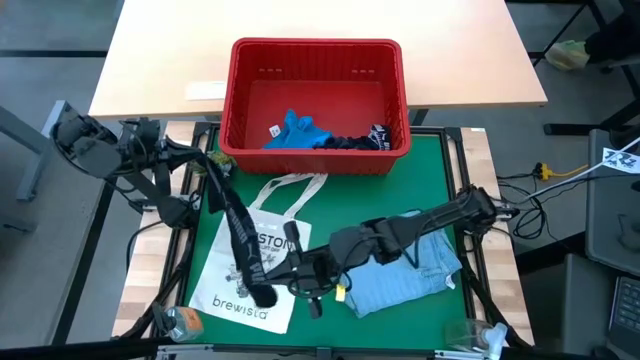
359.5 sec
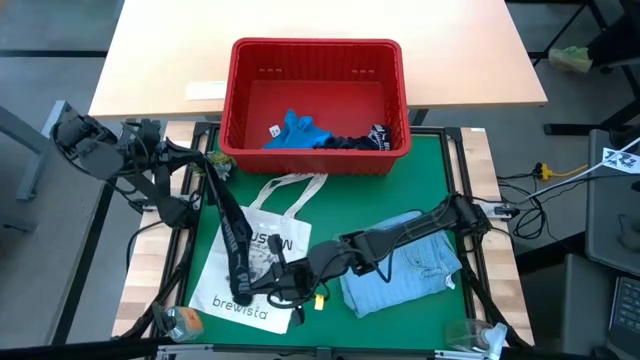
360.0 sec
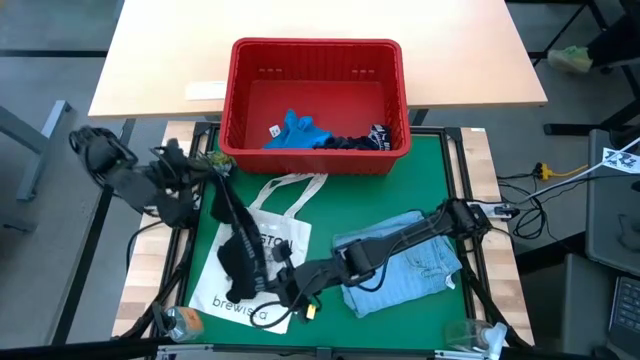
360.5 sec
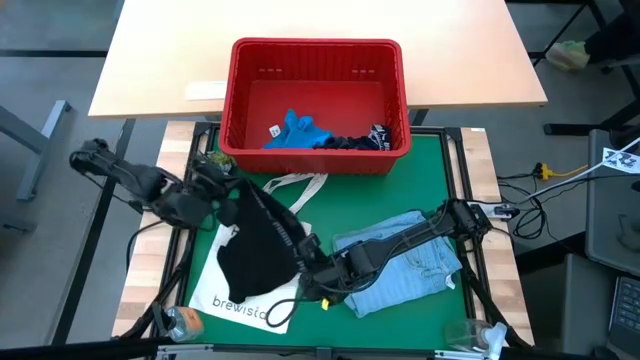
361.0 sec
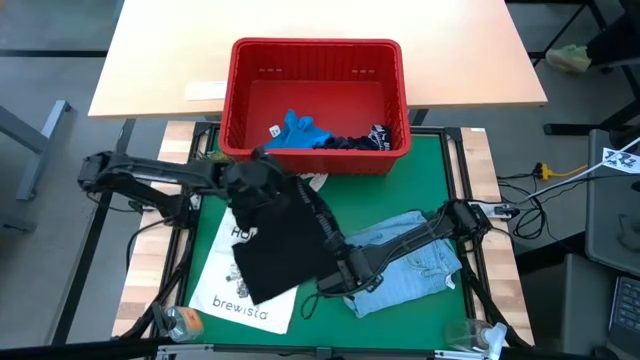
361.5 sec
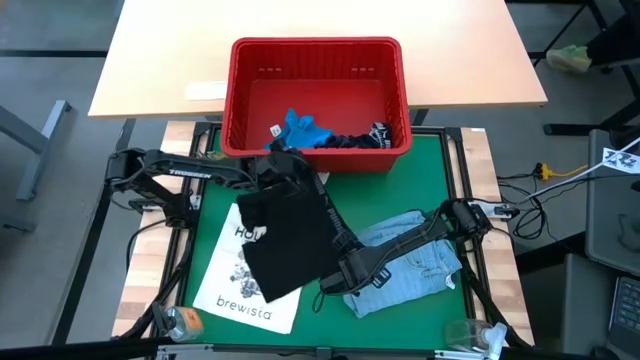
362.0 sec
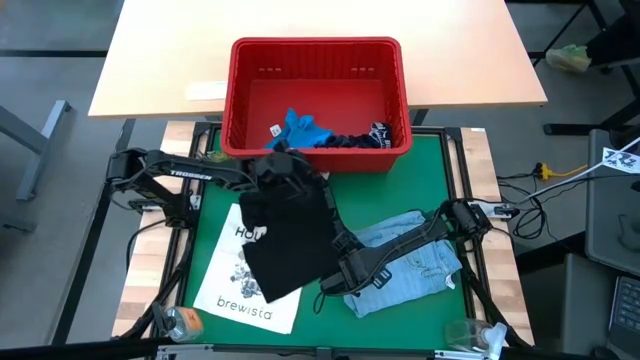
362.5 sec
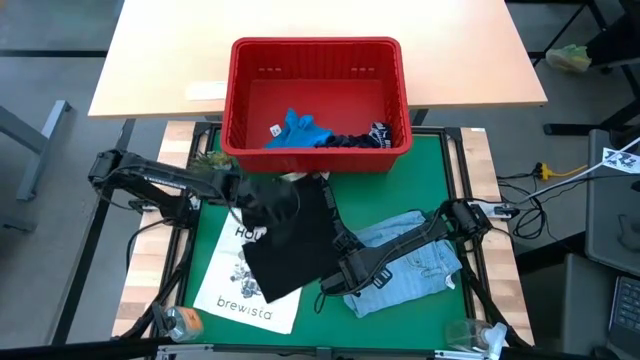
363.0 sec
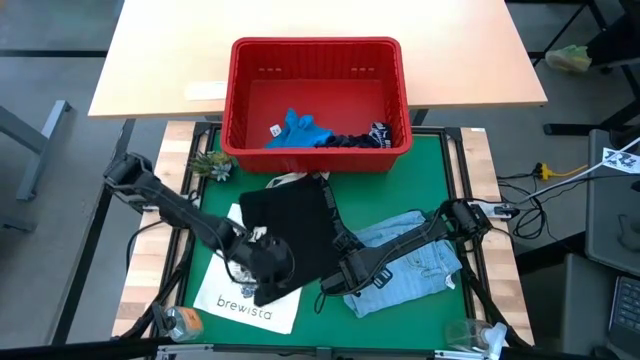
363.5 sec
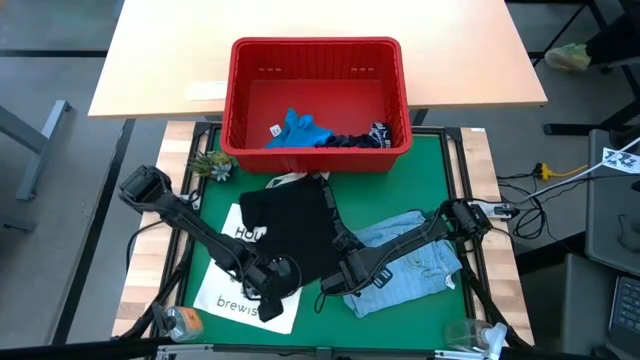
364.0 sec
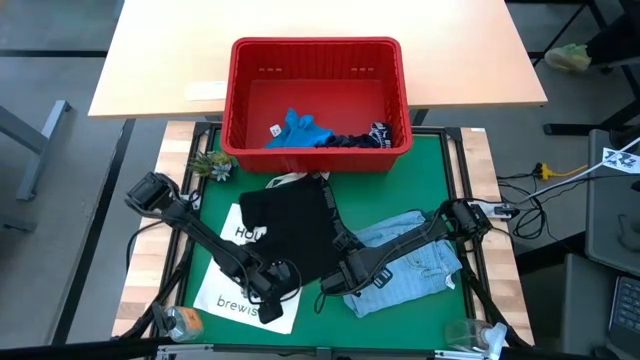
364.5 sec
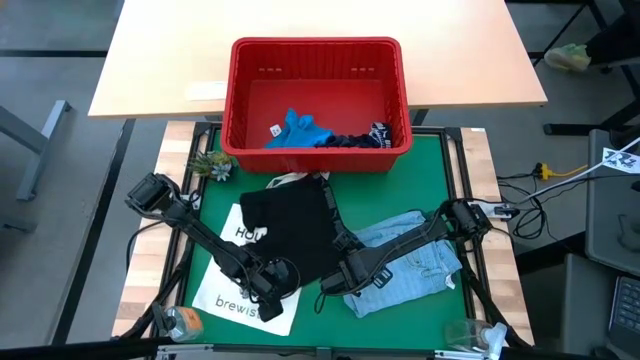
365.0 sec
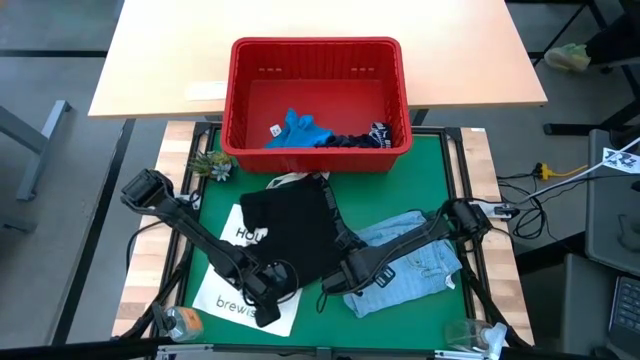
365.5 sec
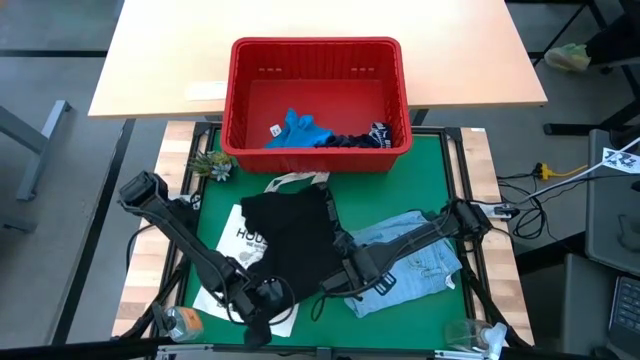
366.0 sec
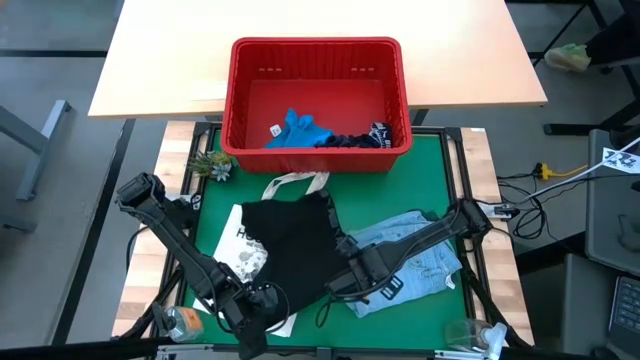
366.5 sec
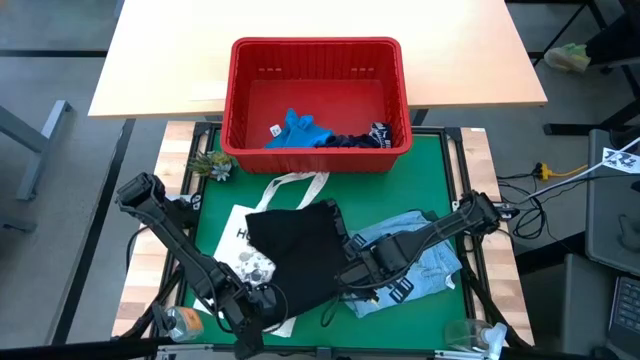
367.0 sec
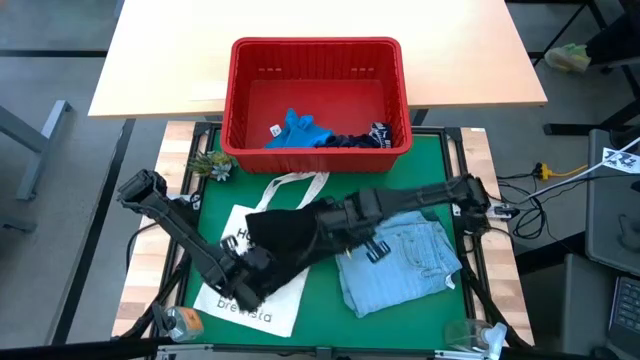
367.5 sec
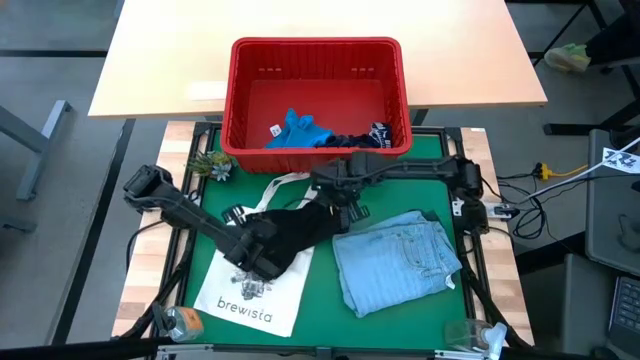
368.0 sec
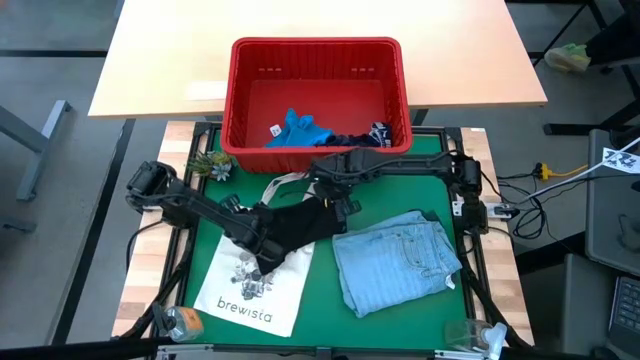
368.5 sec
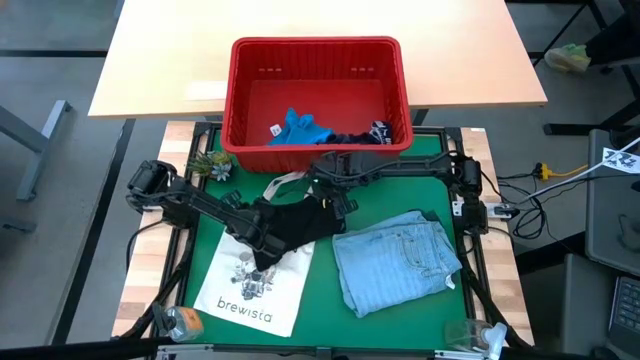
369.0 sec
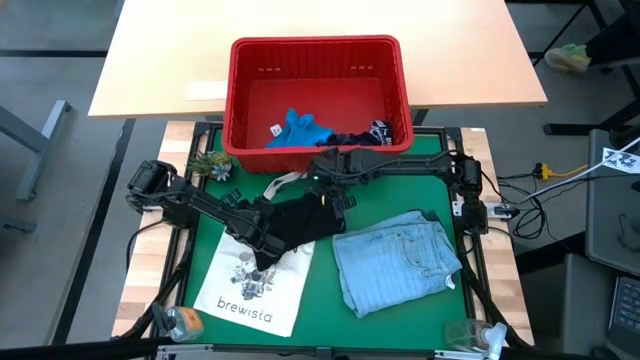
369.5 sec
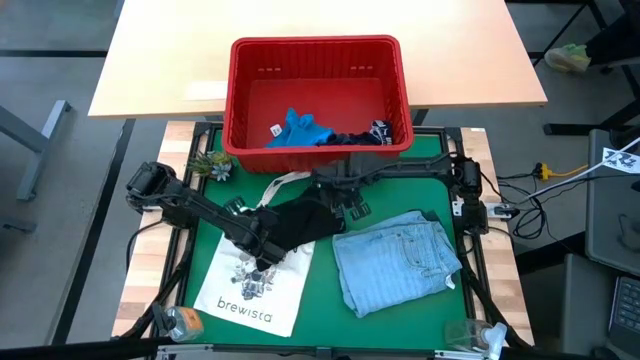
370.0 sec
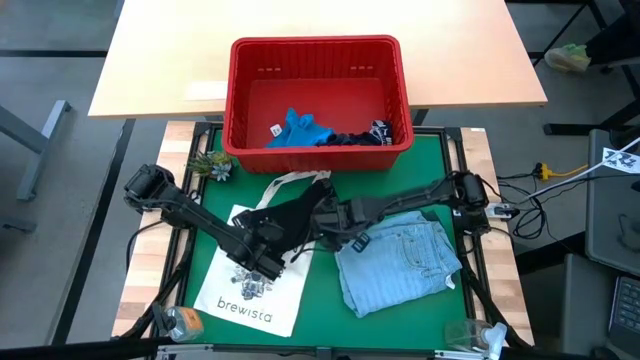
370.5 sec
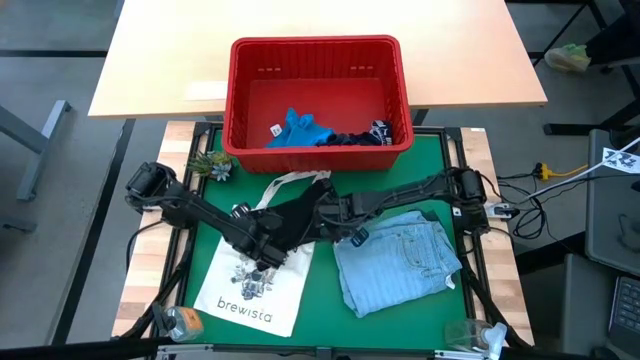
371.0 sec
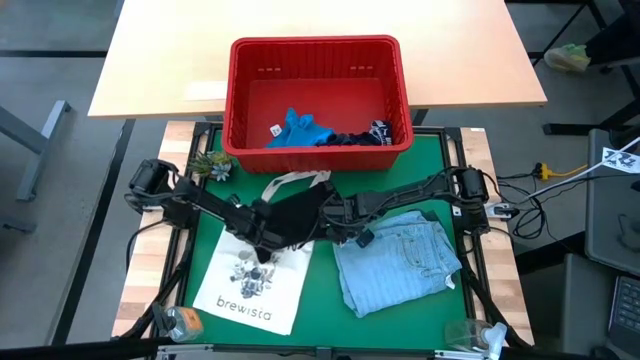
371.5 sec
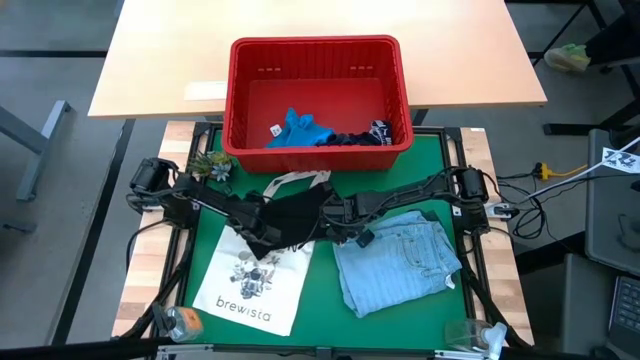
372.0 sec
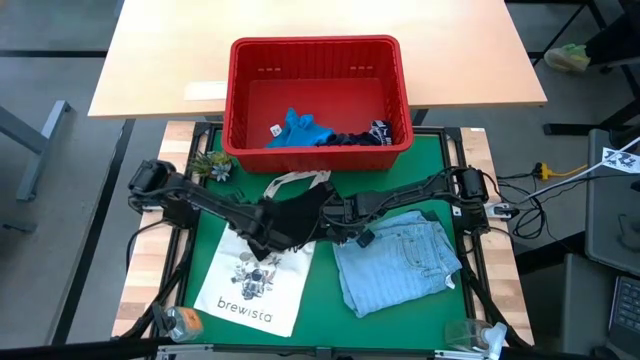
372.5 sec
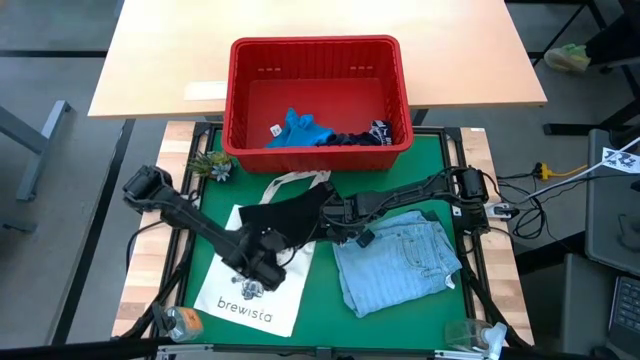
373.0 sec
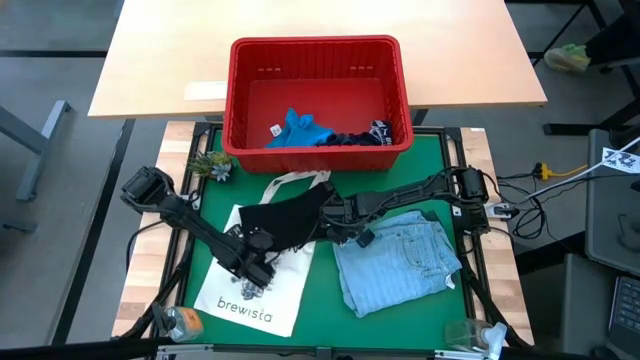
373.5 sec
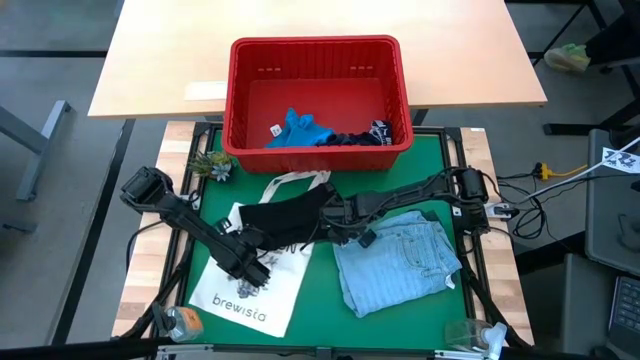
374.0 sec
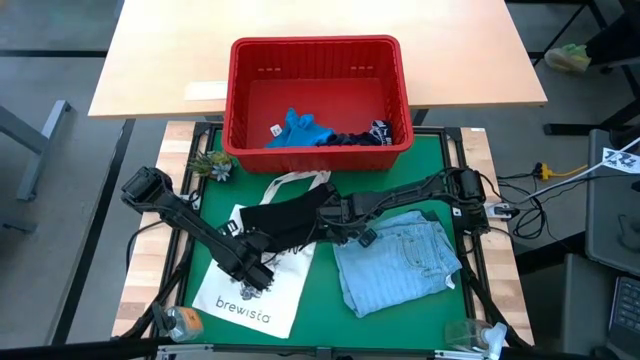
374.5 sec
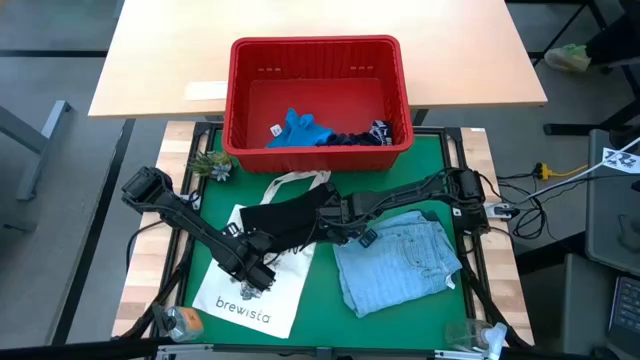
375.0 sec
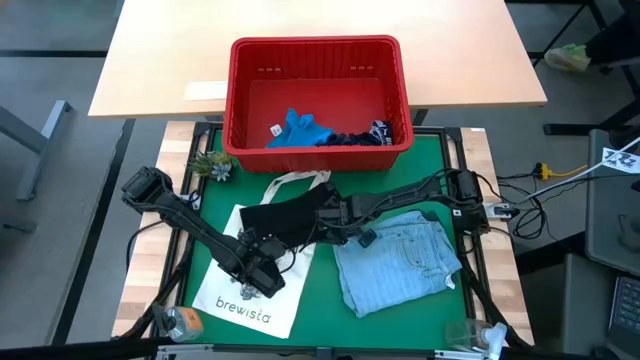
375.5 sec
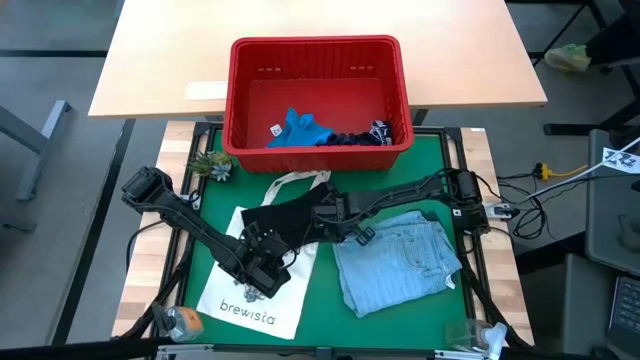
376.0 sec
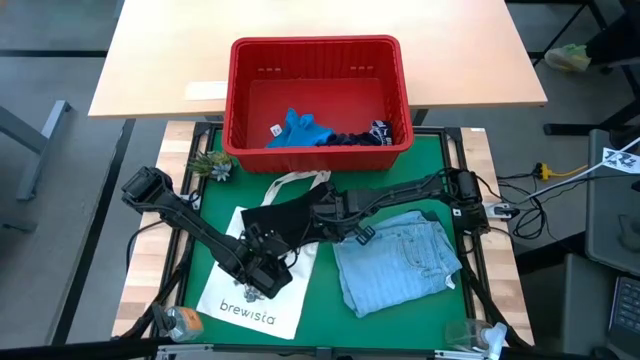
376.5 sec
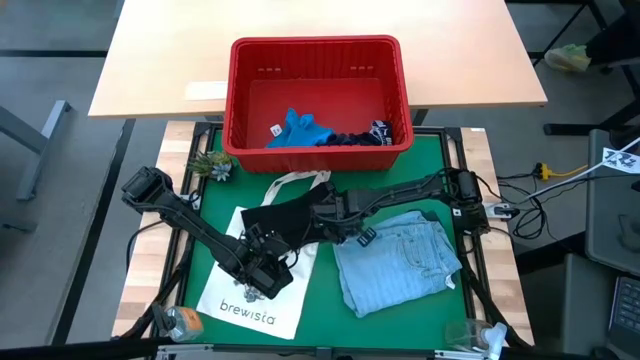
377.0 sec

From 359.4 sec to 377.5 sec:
Task: Fold Laundry from Bin
Fold the black boxer

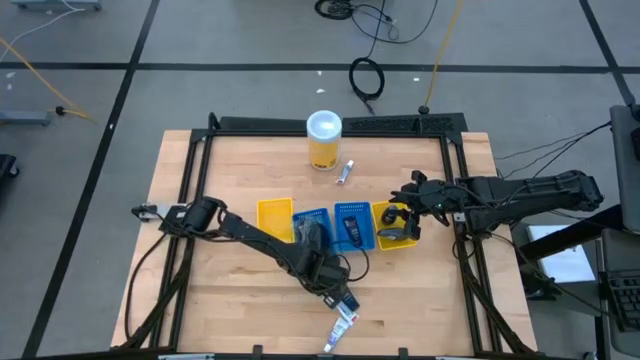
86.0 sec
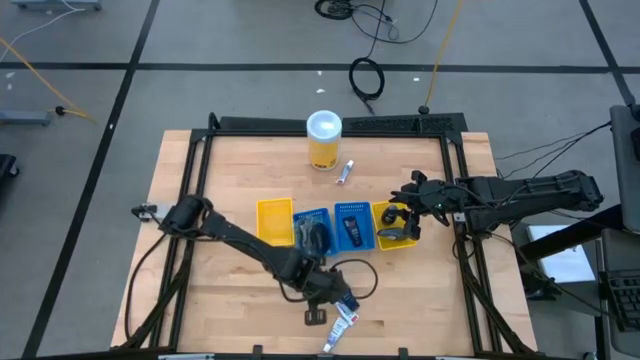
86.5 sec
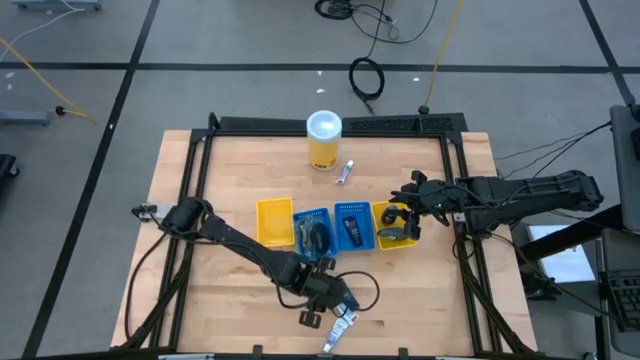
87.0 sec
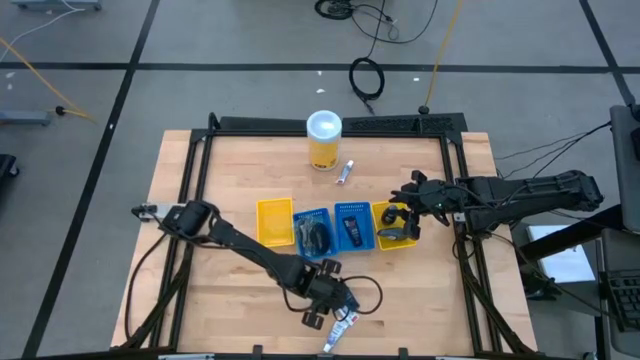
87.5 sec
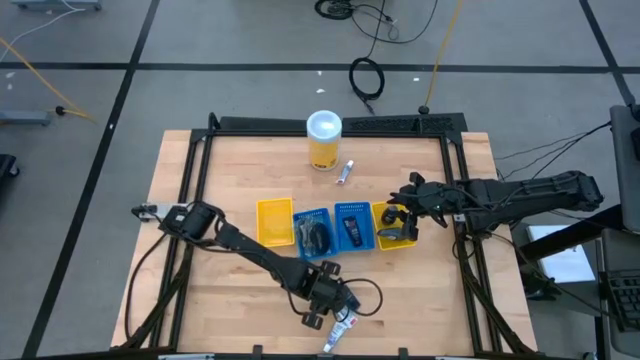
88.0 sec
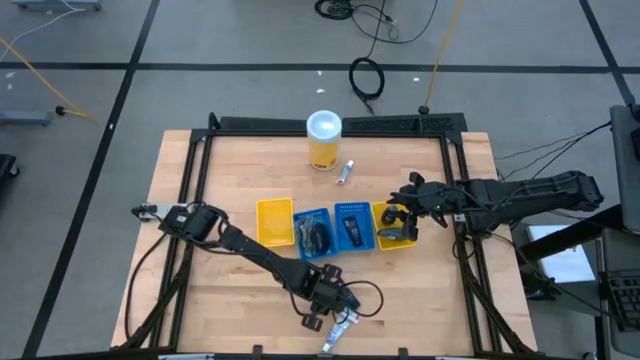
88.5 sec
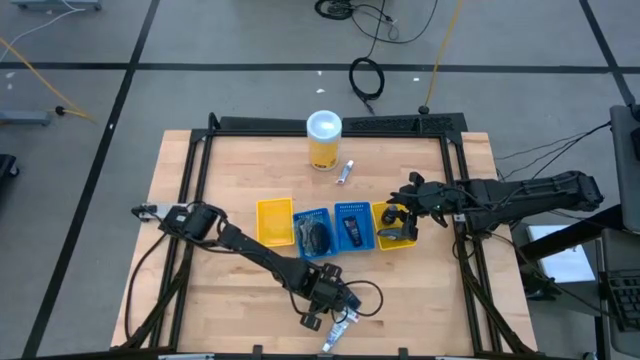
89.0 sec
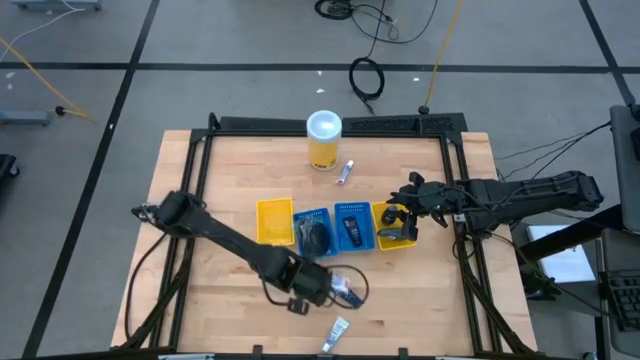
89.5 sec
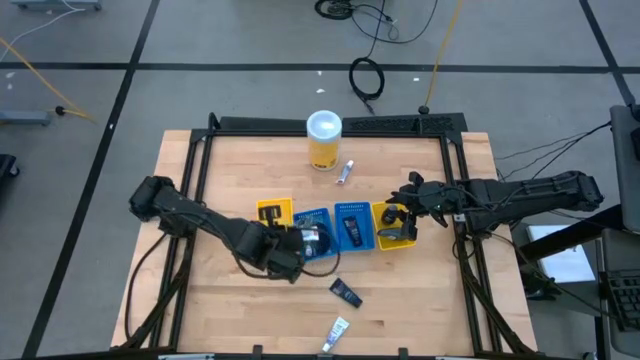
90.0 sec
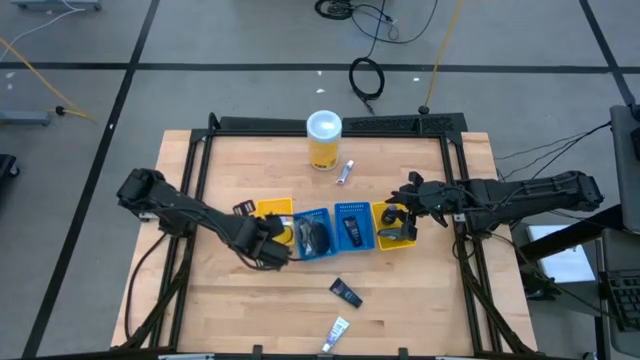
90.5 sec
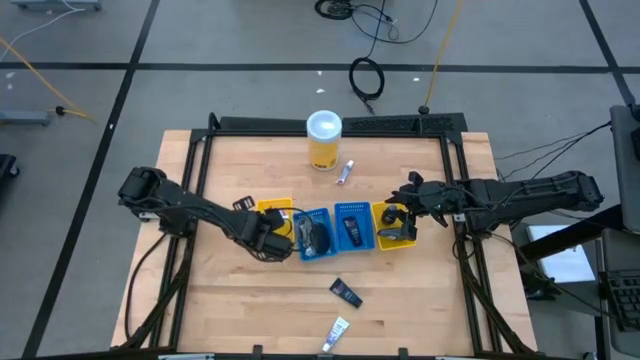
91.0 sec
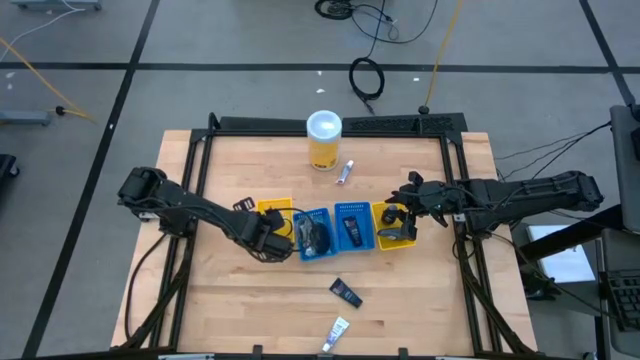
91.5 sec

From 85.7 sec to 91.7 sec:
Task: Pick & Place Travel size toiletries
Put the white toothpaste into the left yellow bin
